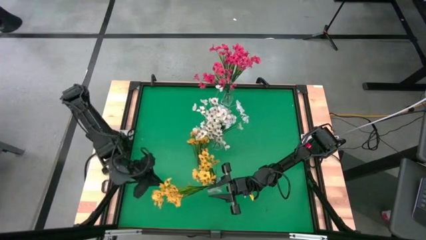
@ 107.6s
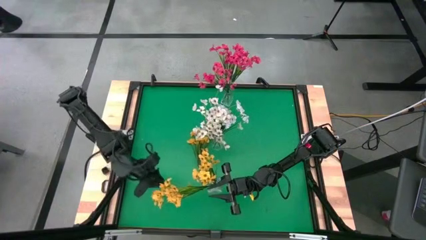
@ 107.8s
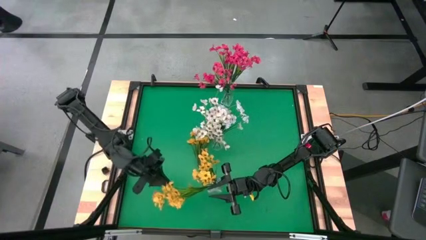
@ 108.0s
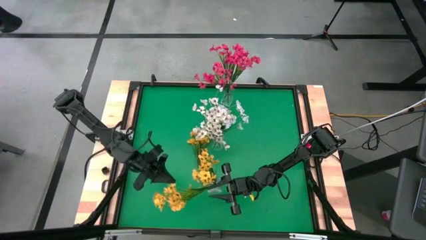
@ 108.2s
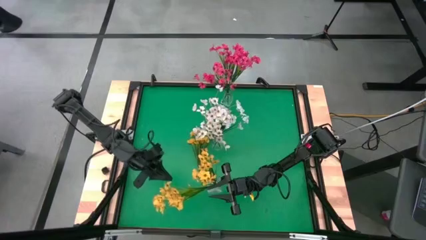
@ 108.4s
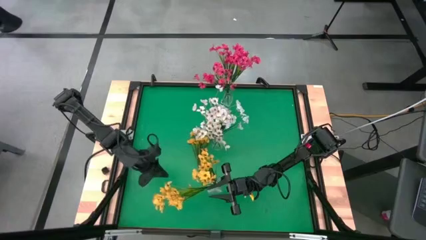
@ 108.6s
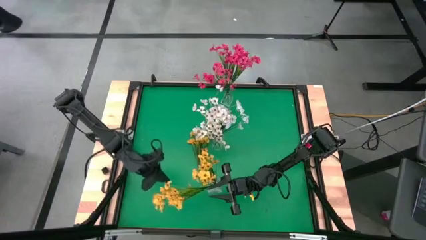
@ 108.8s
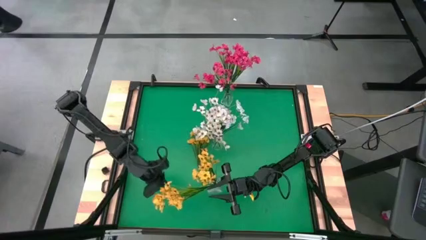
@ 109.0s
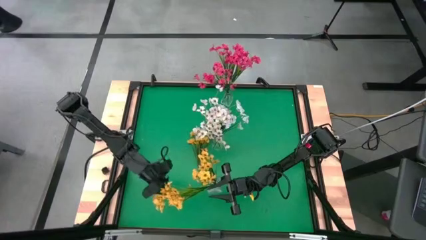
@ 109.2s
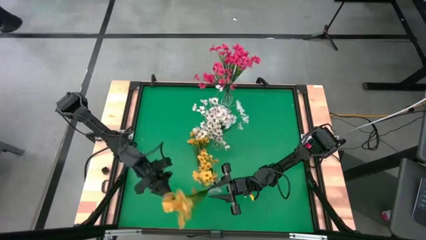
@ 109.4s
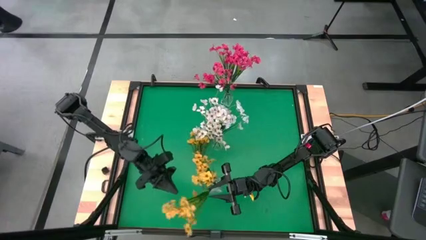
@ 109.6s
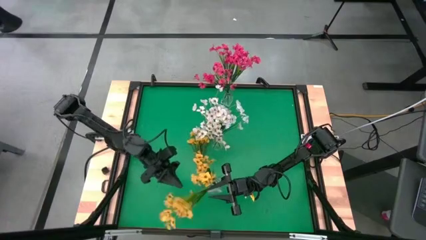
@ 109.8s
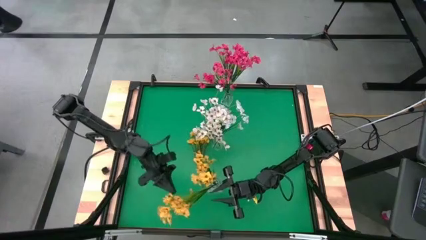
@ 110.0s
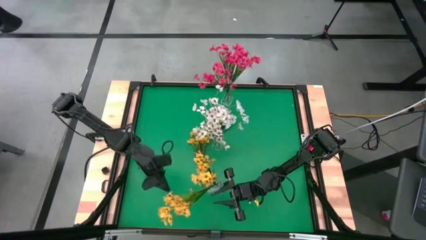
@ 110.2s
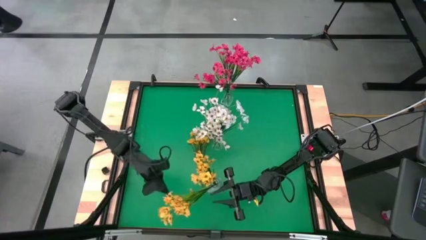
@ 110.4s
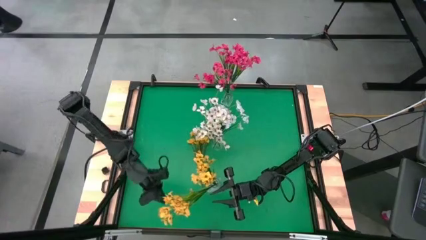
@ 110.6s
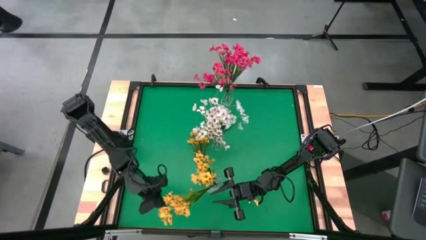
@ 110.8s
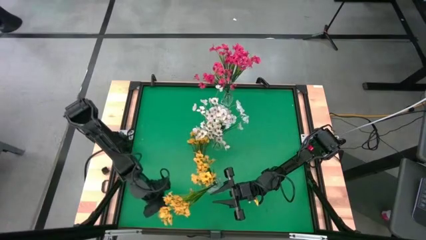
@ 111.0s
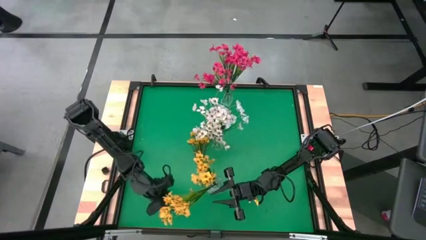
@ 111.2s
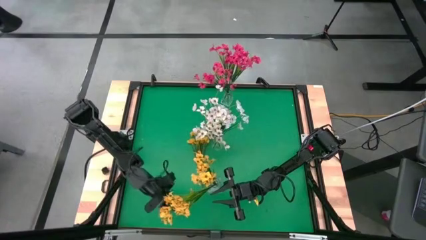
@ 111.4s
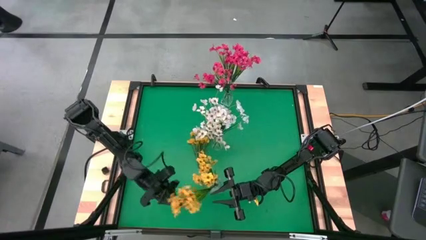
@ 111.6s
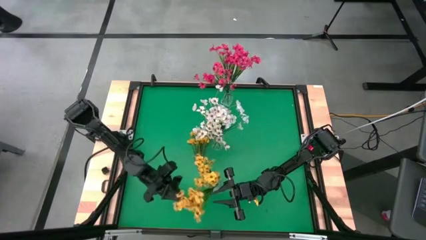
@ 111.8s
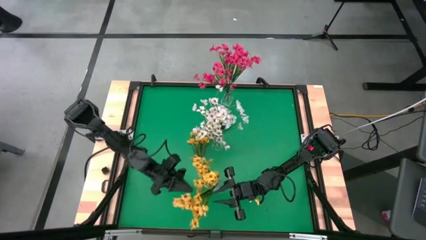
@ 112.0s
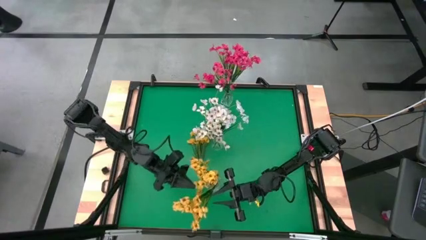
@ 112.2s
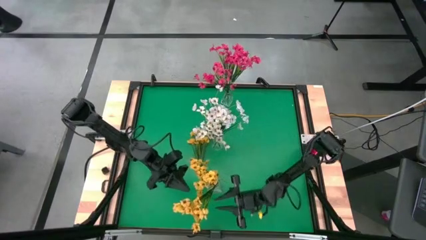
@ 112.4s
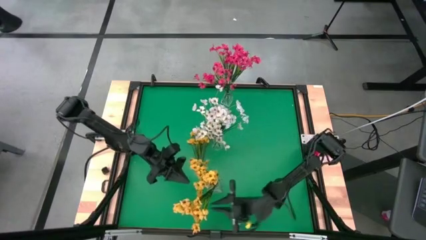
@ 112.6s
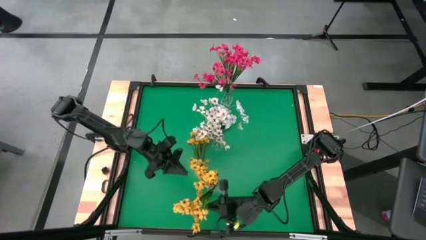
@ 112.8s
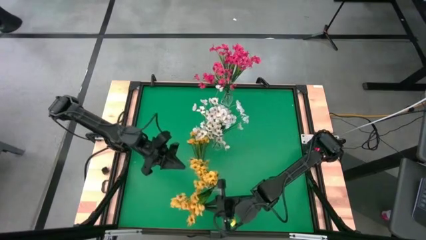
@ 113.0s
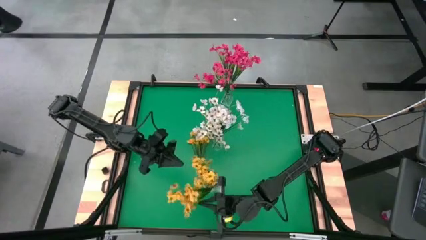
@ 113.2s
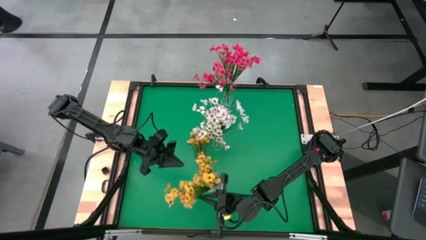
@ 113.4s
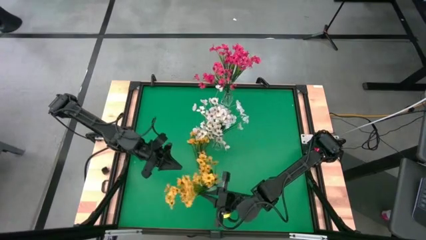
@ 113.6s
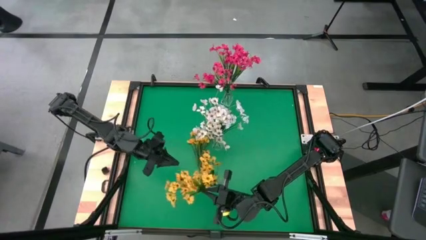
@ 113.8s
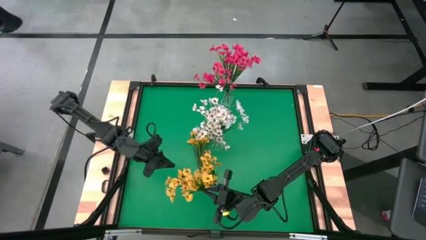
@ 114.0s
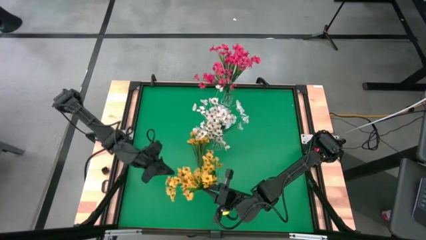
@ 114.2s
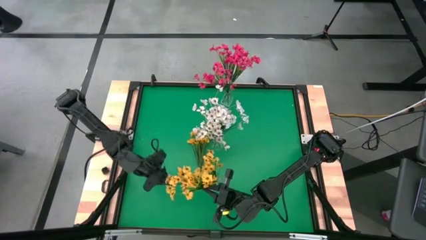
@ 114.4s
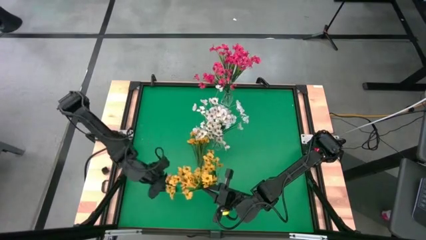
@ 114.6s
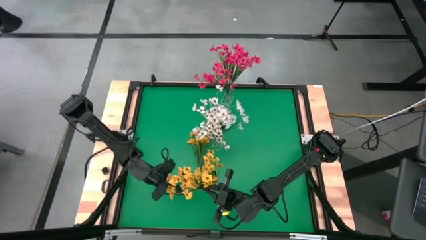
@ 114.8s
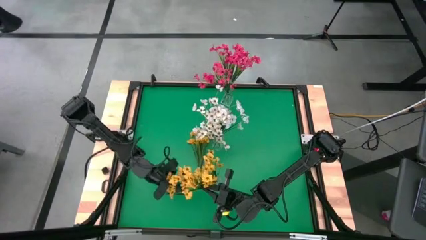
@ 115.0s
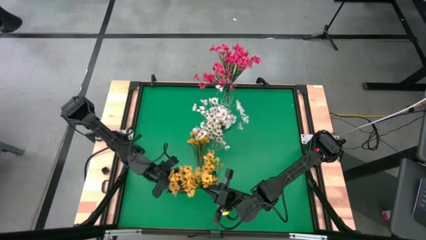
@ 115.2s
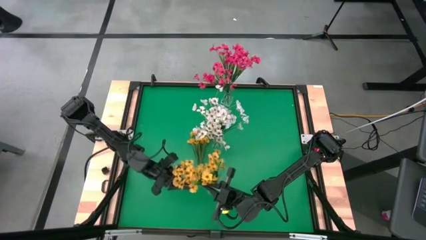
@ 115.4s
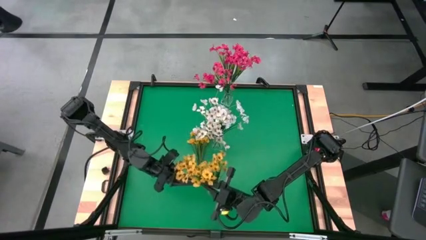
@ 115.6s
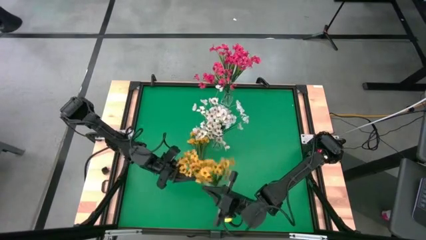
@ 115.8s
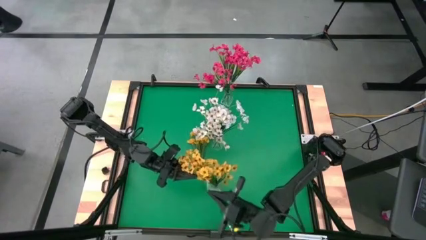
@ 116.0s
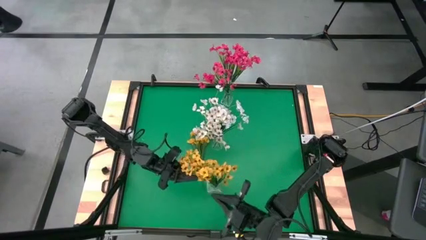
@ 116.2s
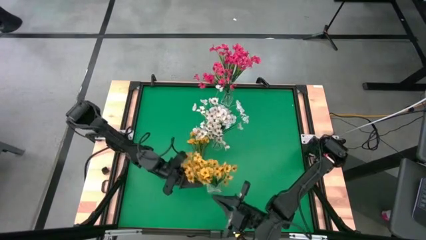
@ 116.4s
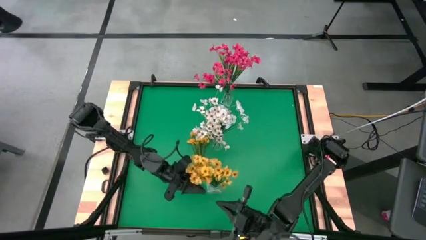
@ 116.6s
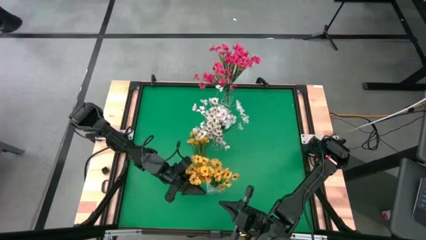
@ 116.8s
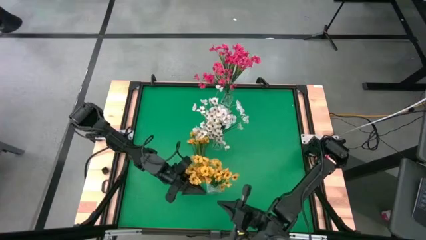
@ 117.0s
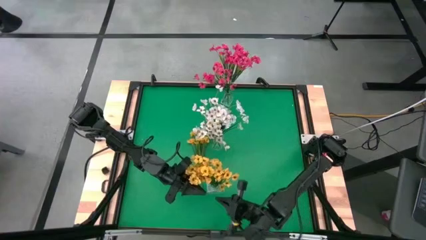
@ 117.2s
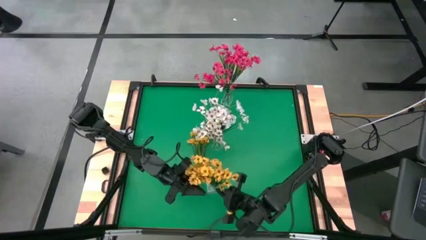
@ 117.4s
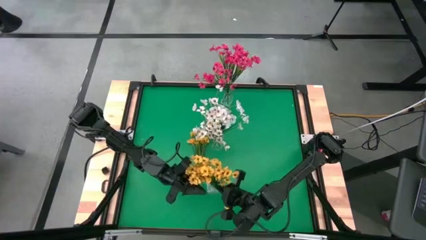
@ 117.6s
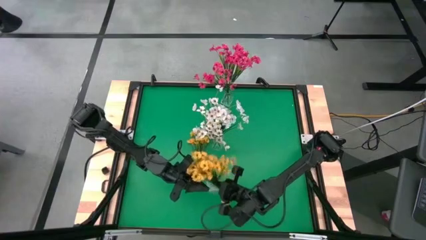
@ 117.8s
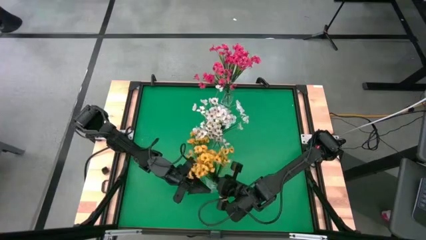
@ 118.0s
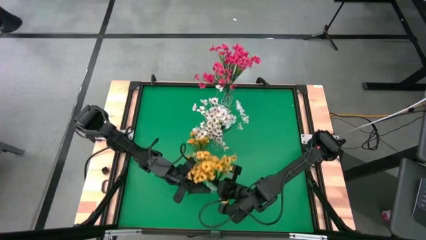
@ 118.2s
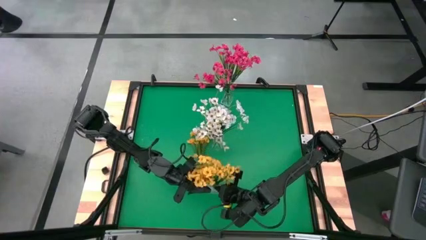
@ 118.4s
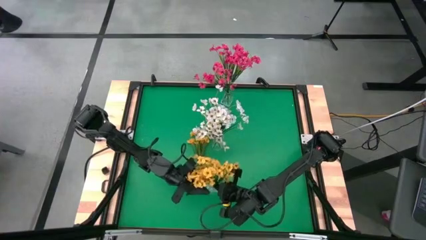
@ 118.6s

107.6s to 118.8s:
Task: Sort flowers into vase by color
Put the bottom yellow flowers into the bottom transparent vase

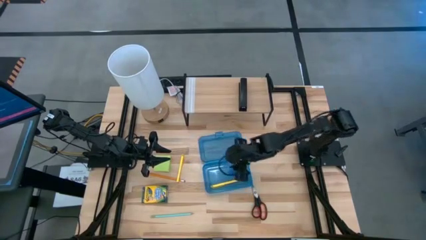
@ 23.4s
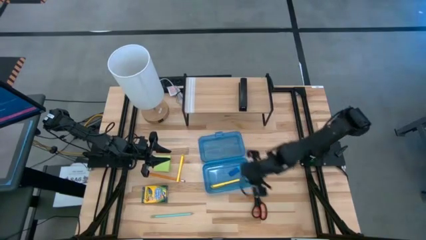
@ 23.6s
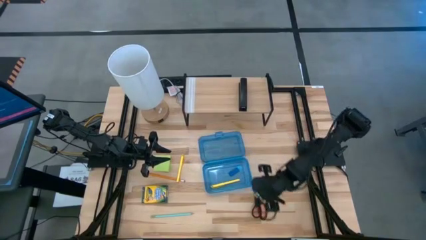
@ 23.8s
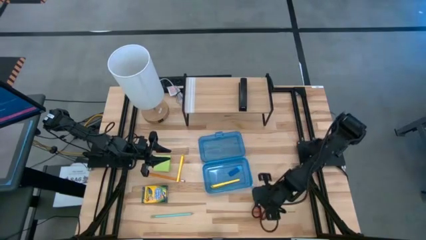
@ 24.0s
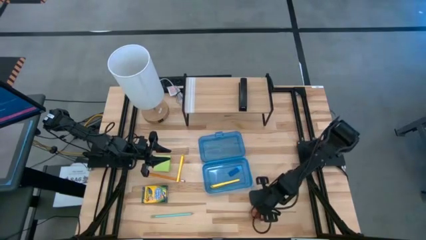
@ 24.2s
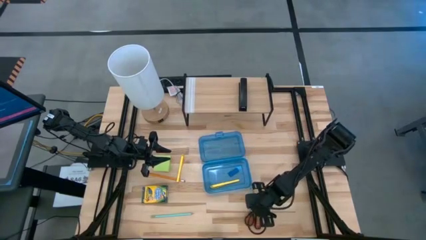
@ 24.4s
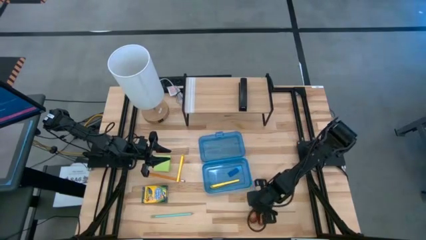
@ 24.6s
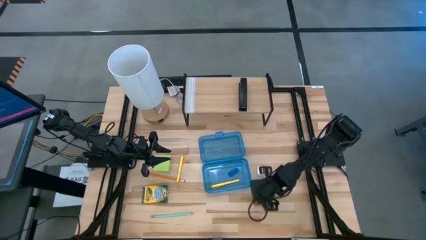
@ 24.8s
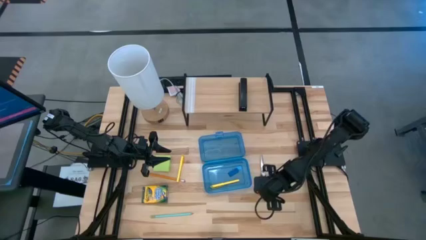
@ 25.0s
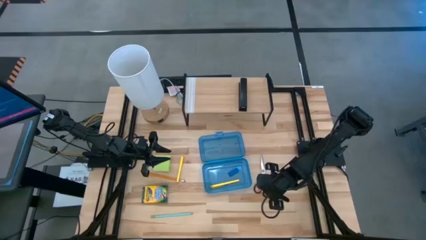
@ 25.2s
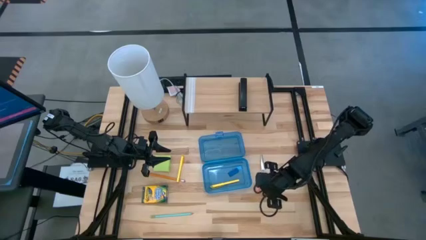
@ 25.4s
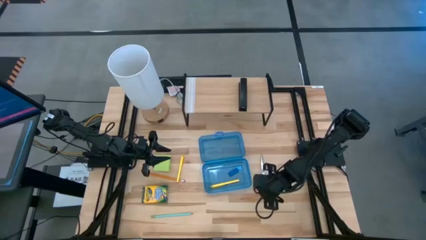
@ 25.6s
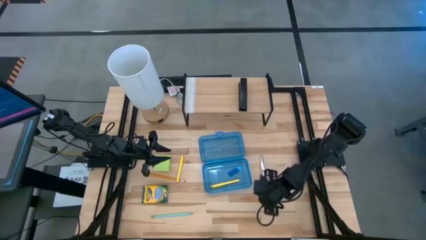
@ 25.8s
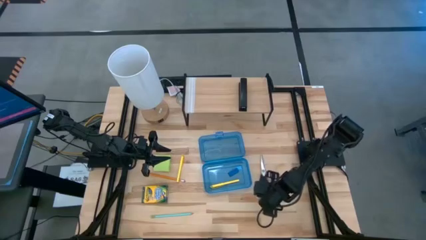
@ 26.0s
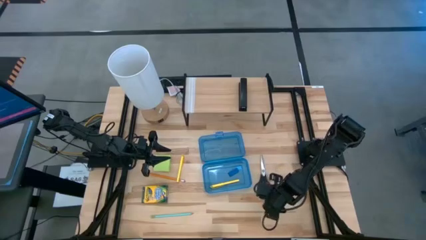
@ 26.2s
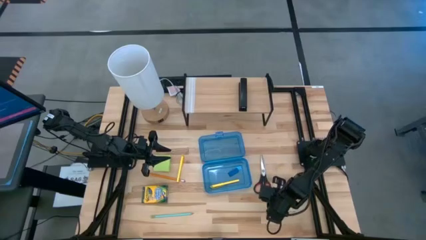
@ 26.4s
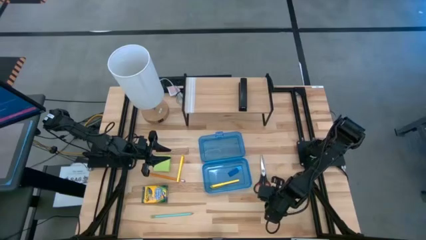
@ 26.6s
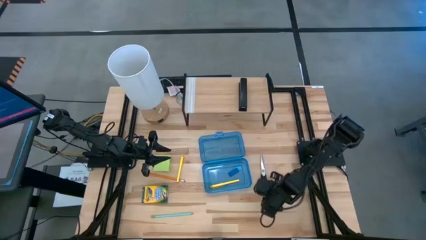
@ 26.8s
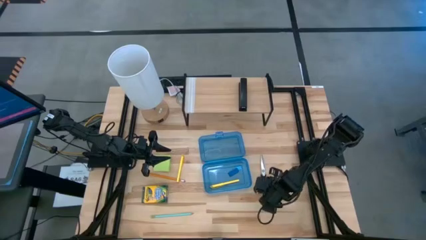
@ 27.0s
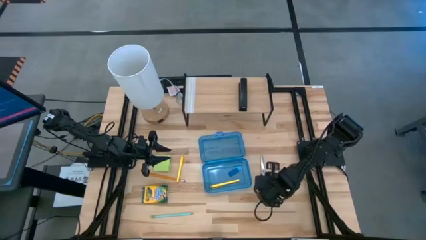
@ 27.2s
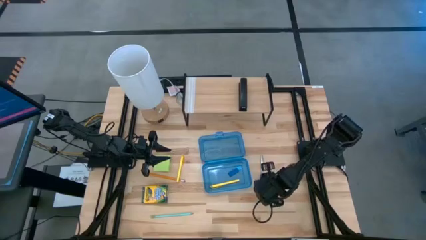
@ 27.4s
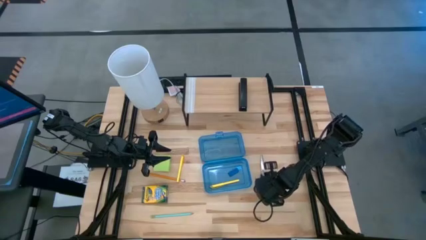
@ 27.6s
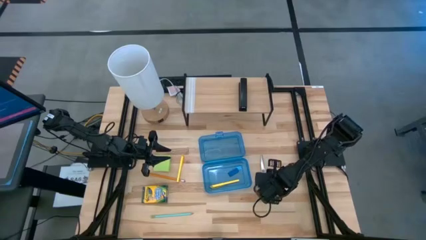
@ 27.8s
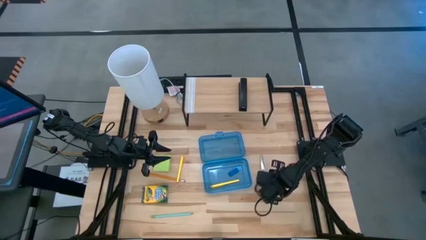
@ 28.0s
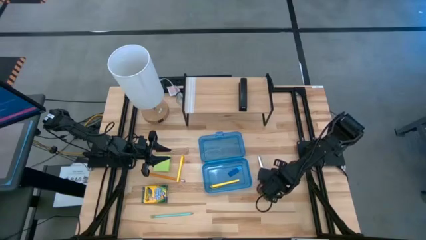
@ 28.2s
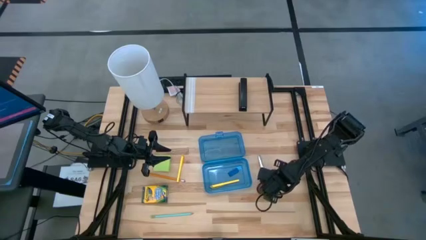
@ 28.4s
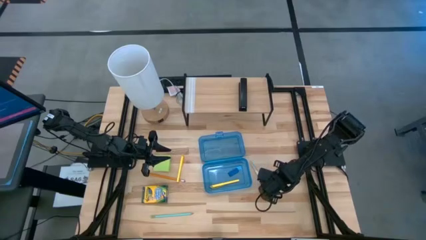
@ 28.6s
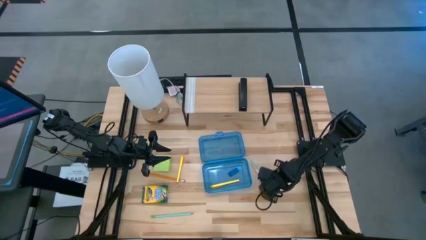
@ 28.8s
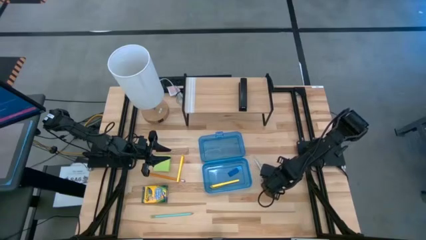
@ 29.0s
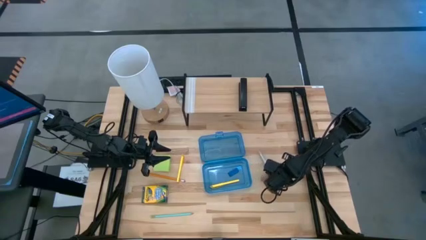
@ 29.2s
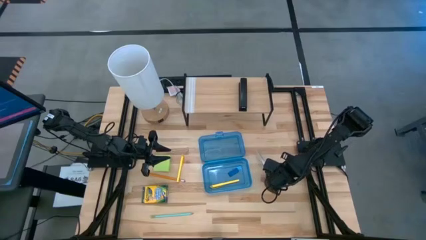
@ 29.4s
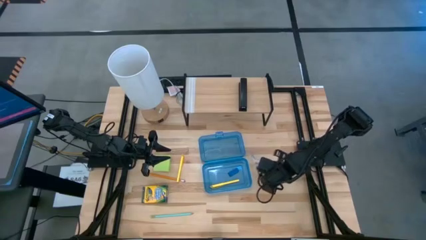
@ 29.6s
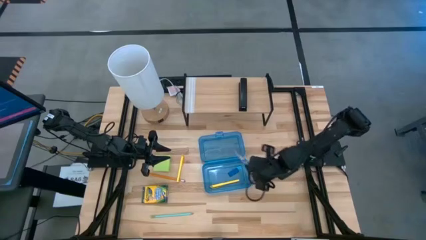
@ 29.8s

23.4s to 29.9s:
Task: Pack school essentials
Put the black scissors into the blue supply box
